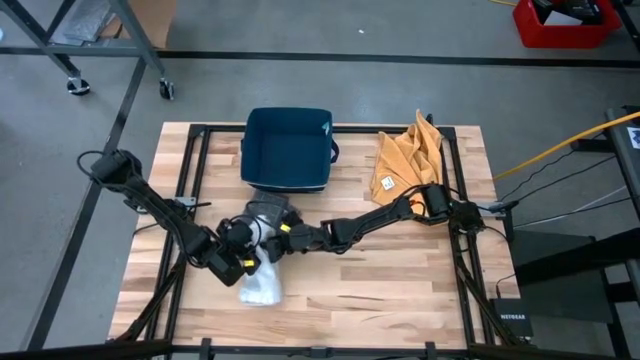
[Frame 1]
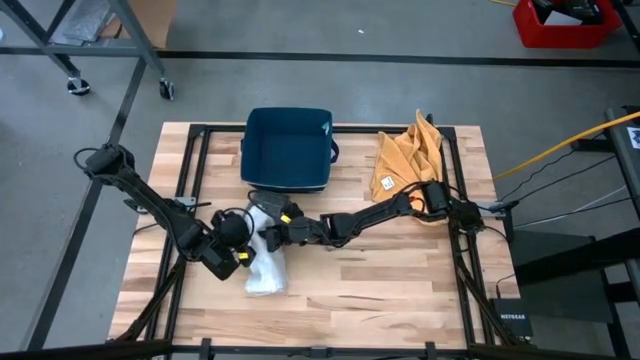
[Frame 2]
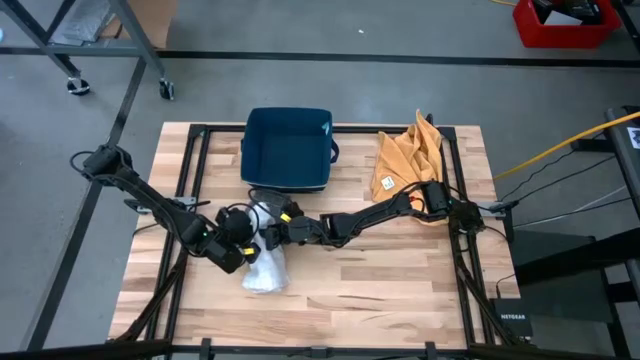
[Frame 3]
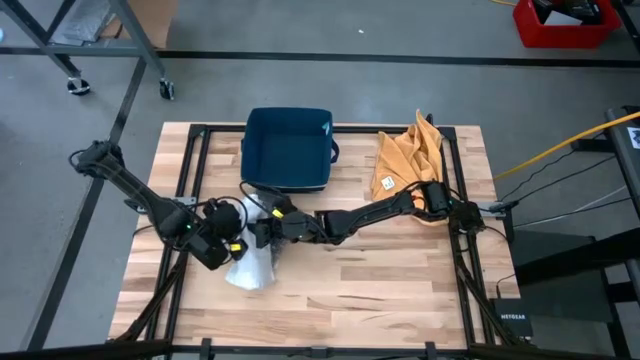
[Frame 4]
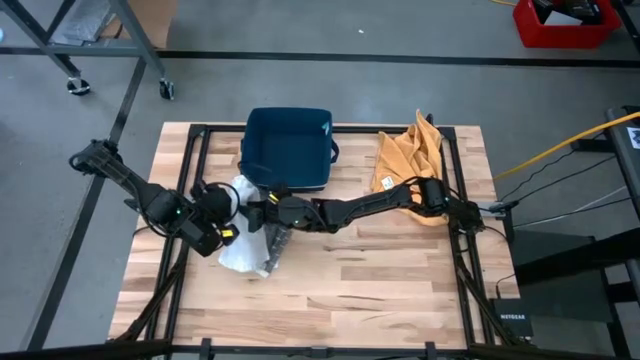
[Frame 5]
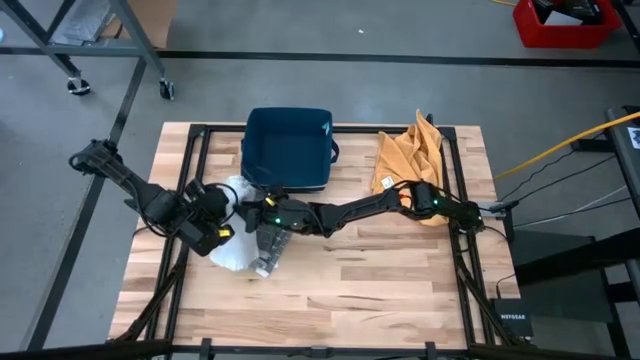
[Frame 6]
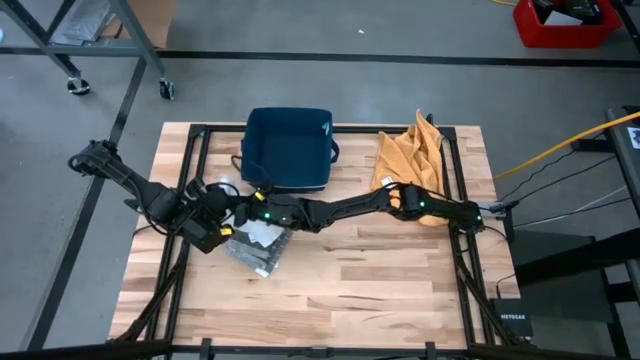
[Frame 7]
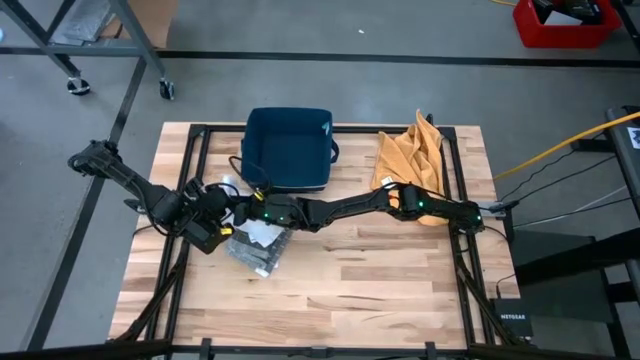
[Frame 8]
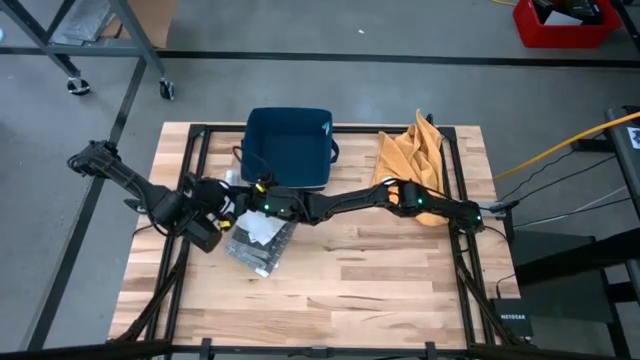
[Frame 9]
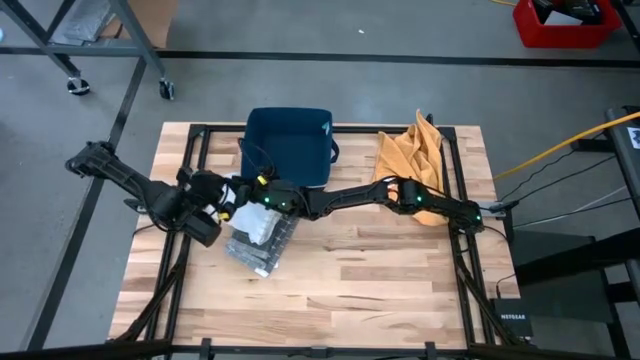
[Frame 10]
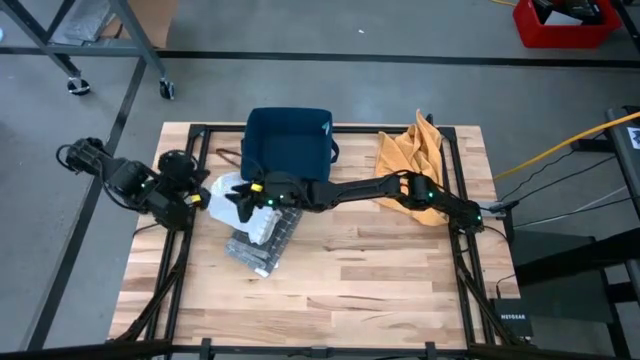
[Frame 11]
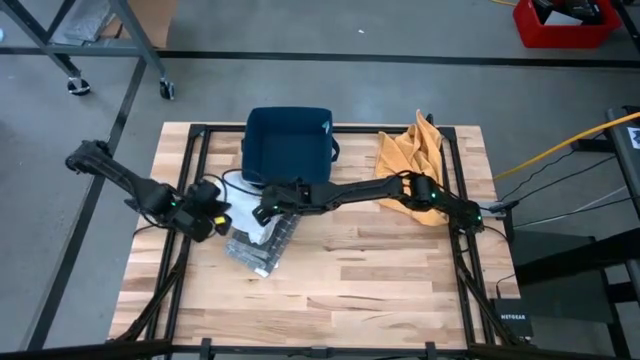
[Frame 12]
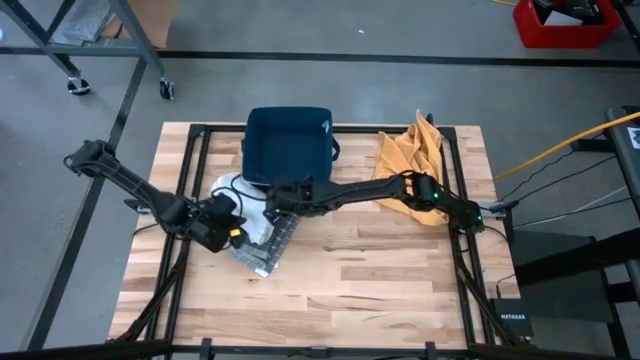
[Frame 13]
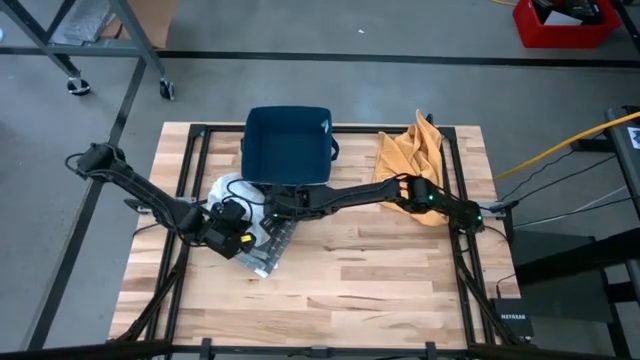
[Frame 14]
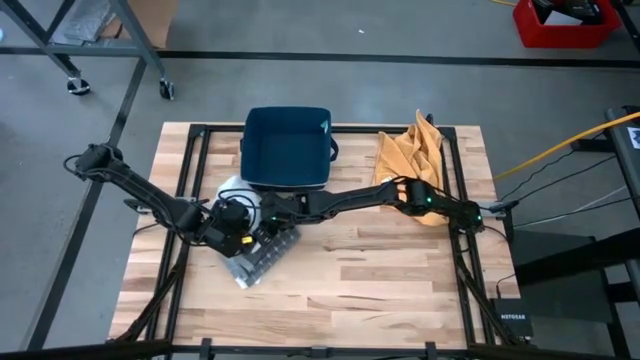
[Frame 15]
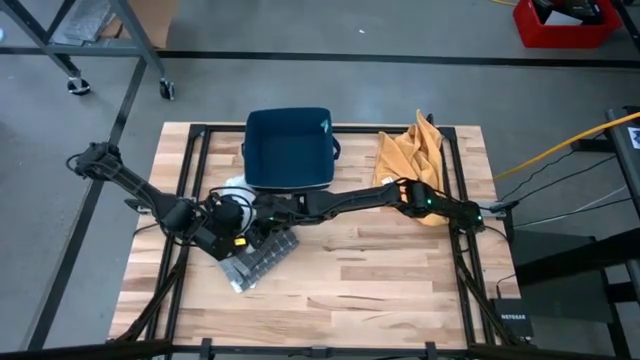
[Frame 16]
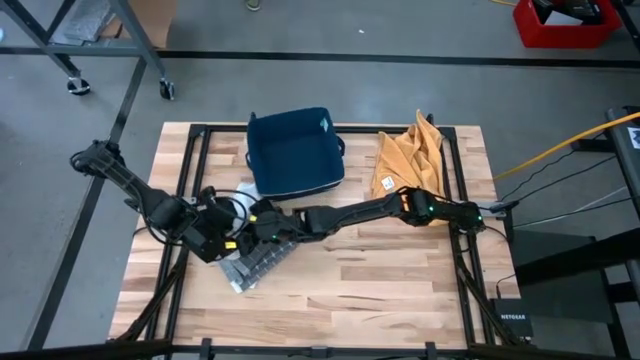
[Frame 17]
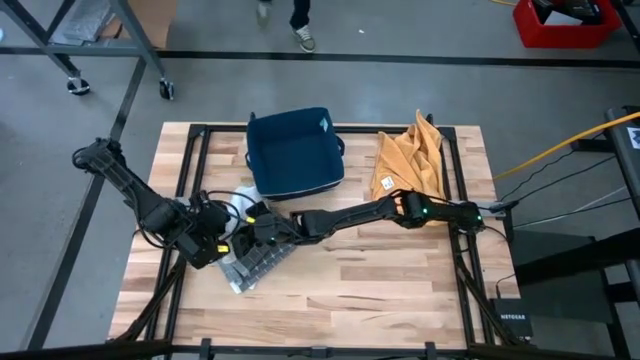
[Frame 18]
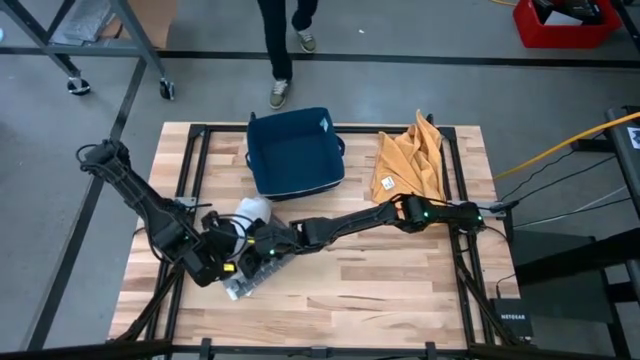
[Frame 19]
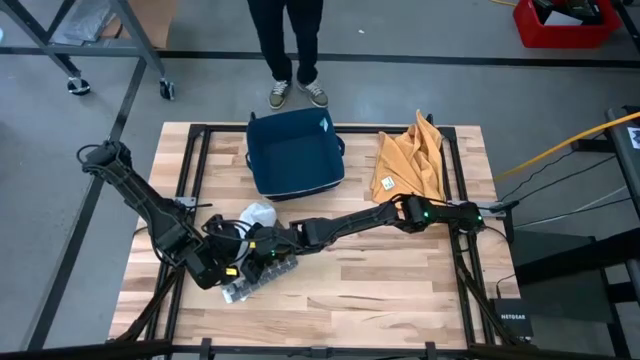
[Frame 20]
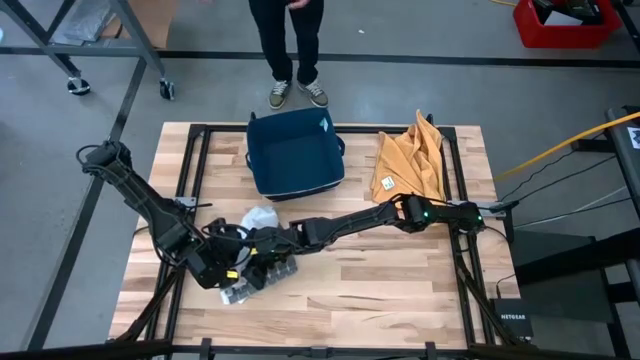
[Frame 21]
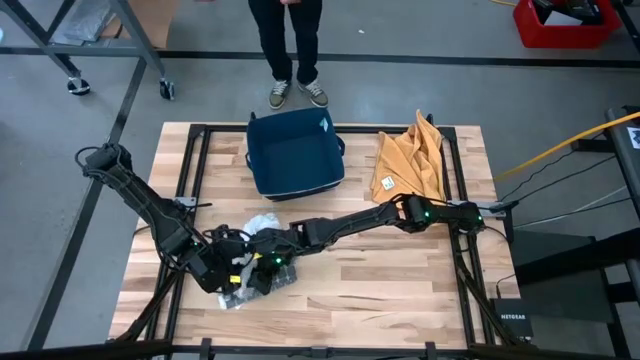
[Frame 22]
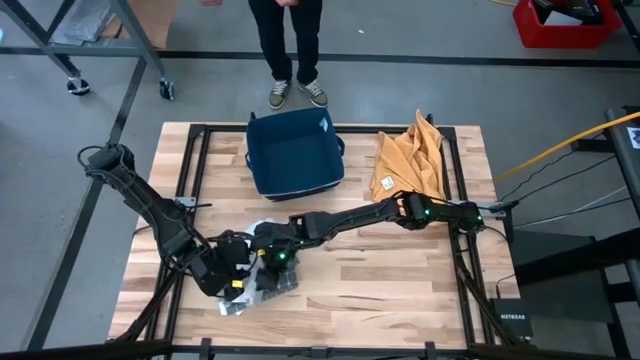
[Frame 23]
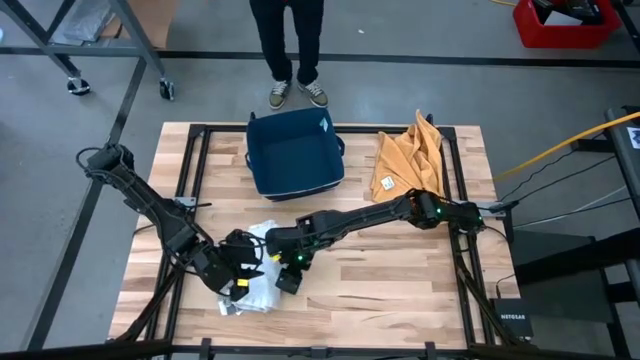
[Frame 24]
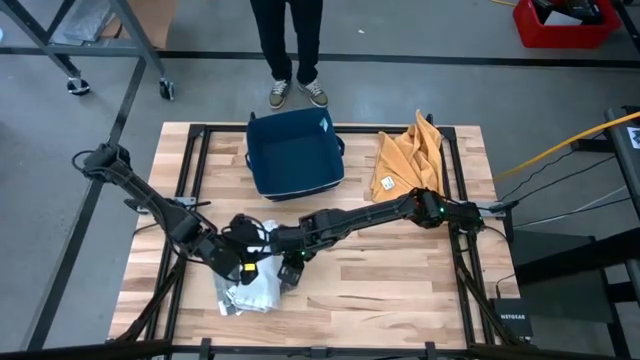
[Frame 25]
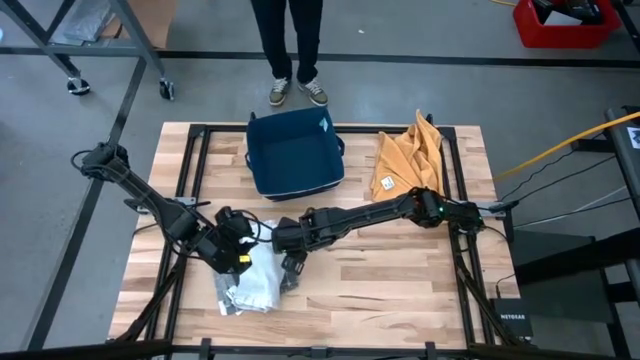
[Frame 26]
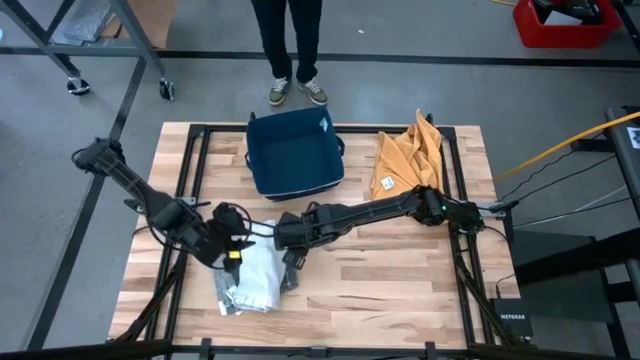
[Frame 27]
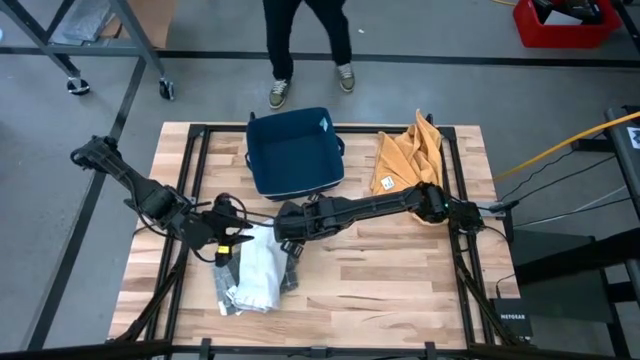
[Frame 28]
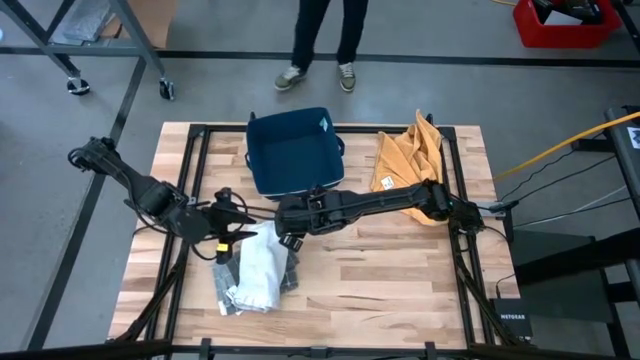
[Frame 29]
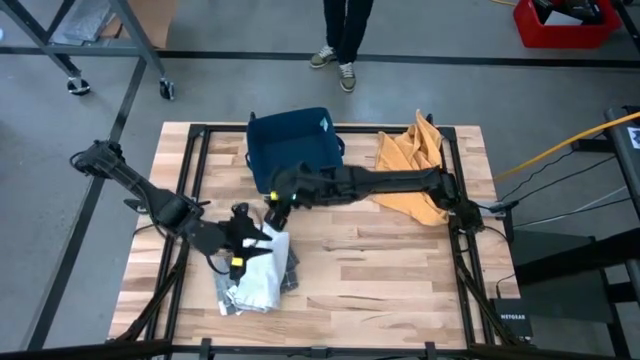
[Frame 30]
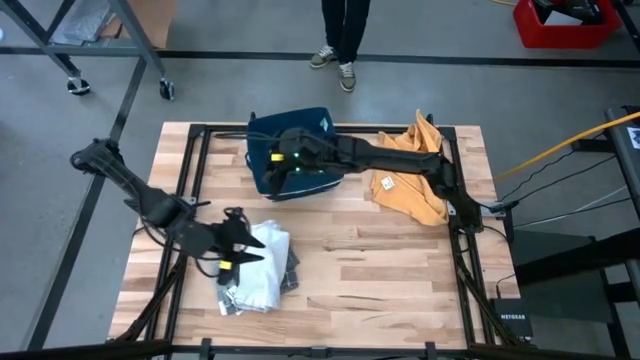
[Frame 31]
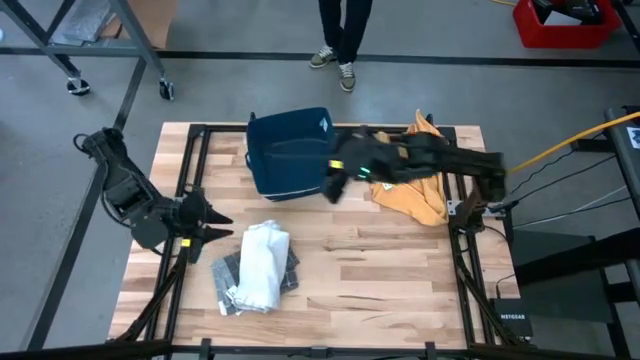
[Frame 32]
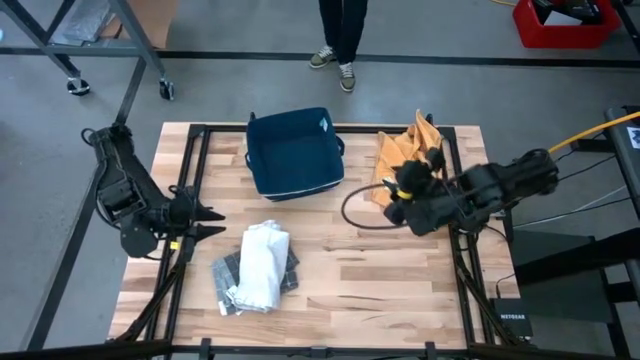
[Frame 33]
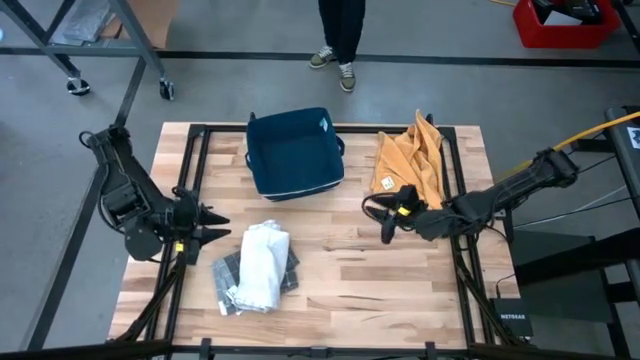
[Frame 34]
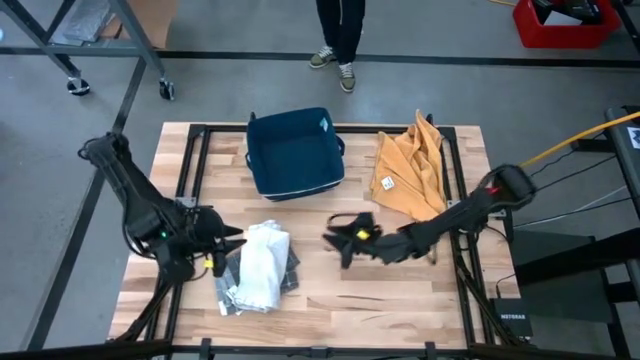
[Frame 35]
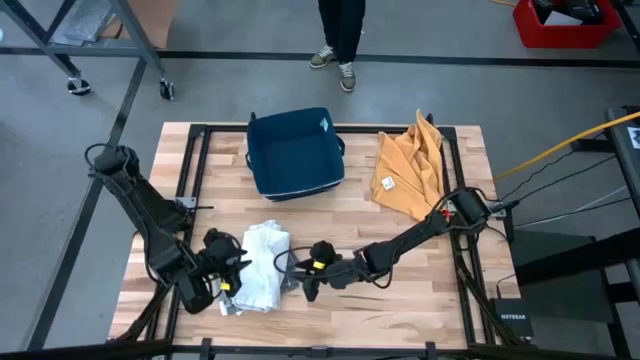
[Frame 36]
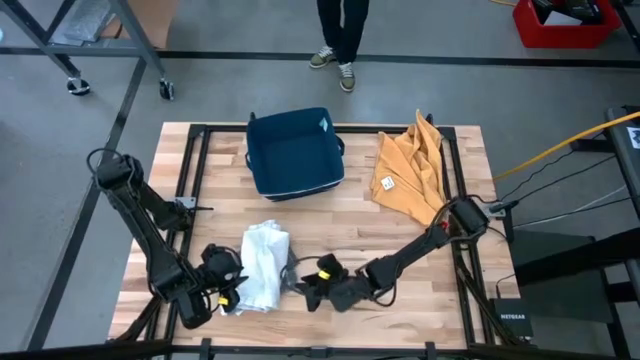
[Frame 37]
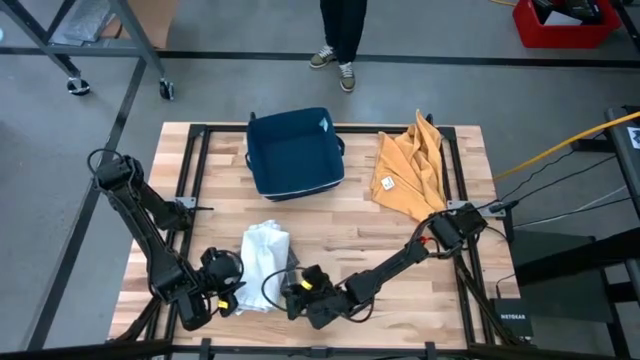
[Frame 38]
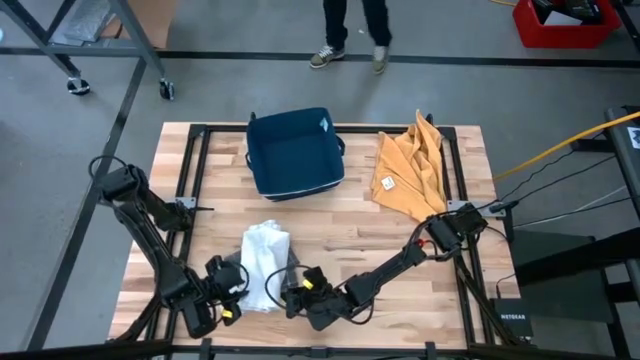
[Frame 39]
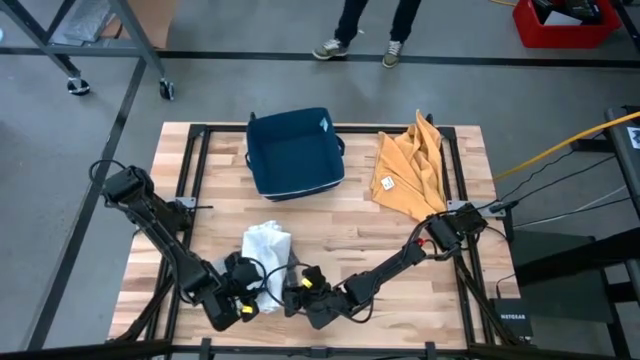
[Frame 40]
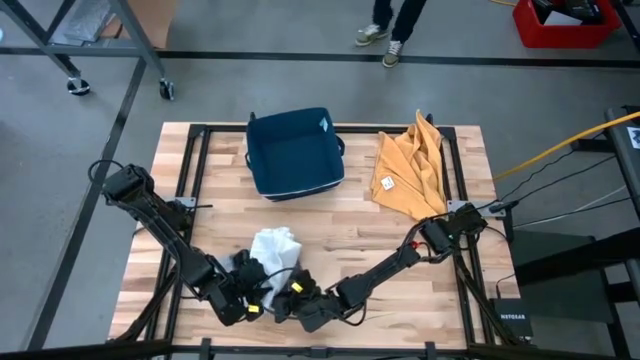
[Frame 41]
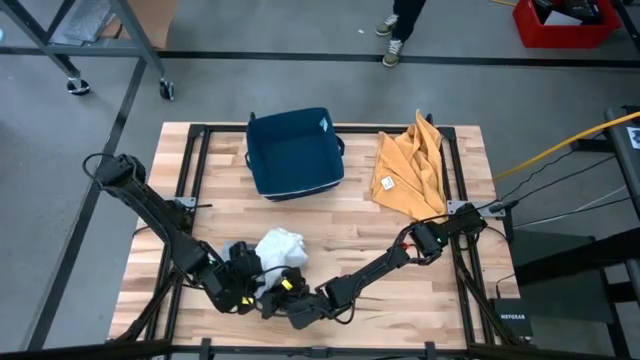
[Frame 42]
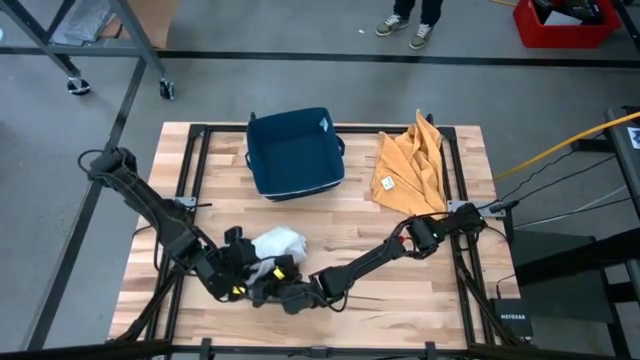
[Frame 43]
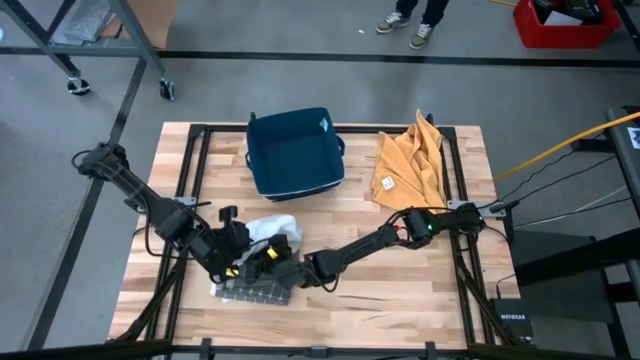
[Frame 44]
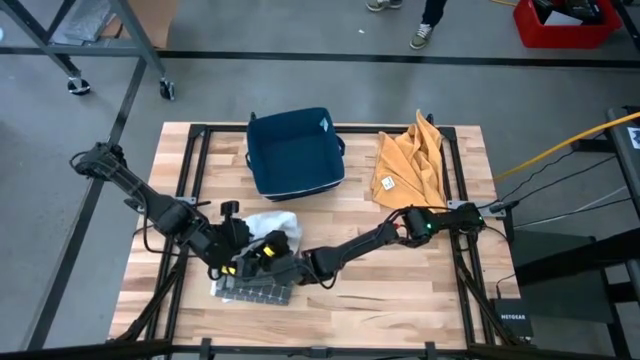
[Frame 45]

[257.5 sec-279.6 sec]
Task: Fold towel
Stack the folded white patterned towel on top of the folded gray patterned towel
